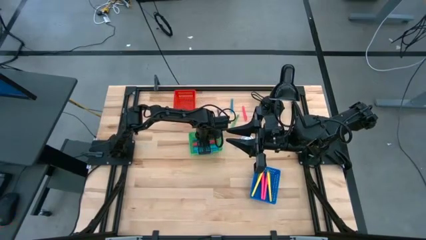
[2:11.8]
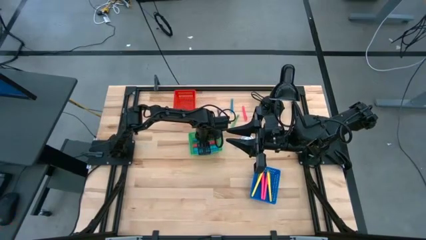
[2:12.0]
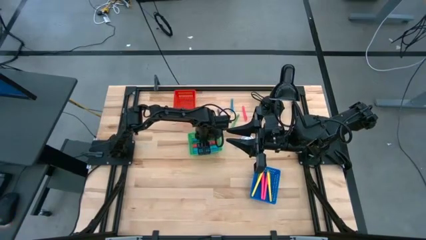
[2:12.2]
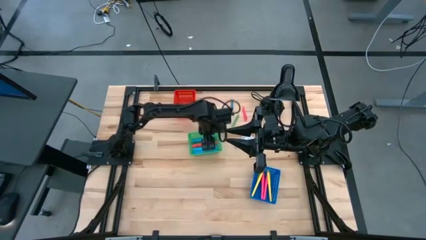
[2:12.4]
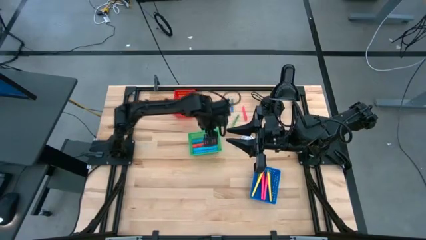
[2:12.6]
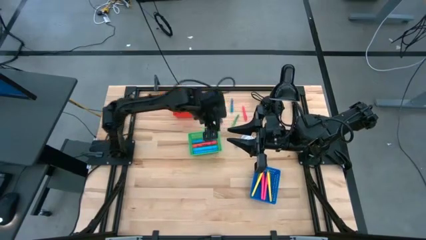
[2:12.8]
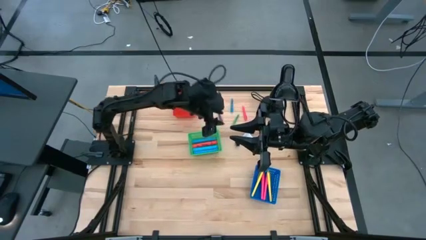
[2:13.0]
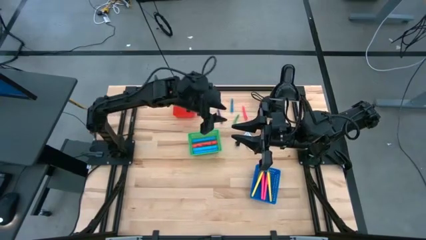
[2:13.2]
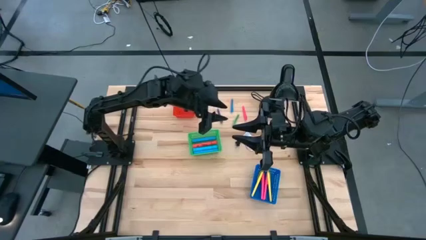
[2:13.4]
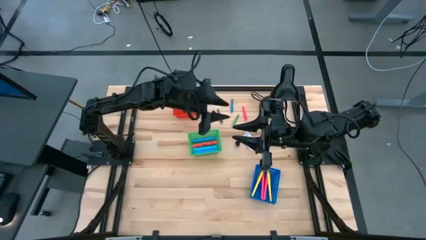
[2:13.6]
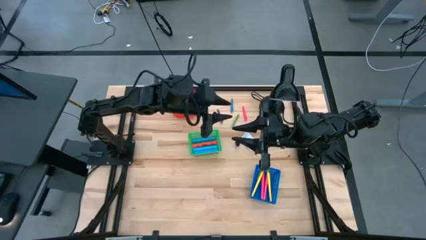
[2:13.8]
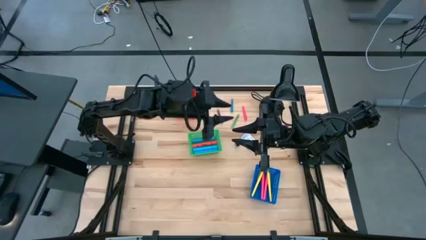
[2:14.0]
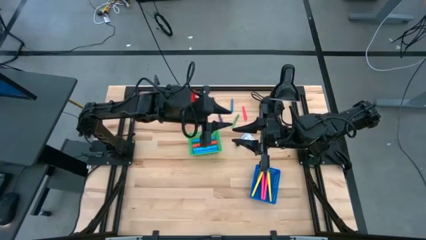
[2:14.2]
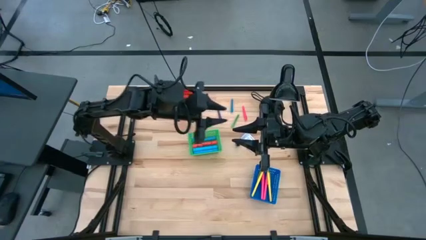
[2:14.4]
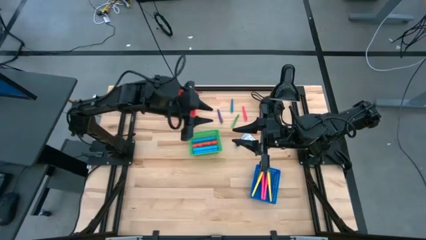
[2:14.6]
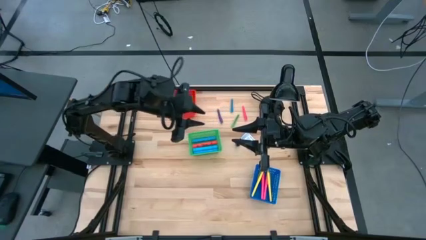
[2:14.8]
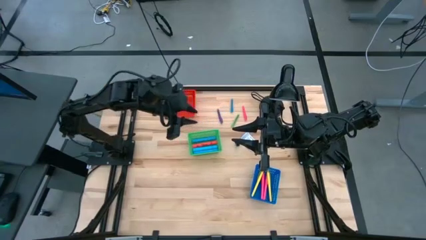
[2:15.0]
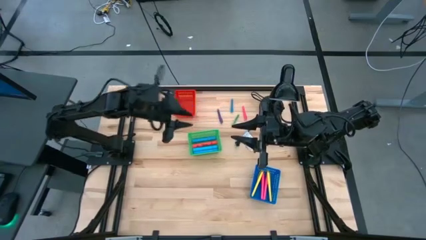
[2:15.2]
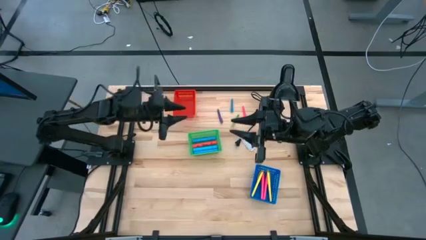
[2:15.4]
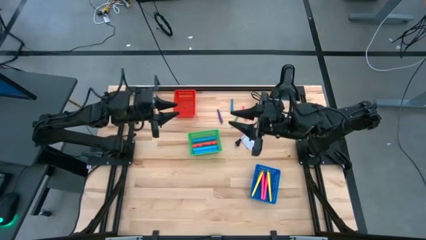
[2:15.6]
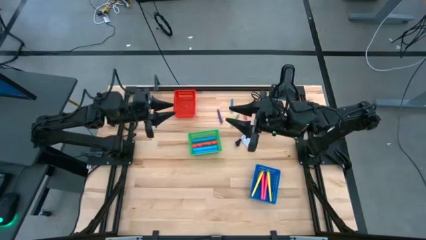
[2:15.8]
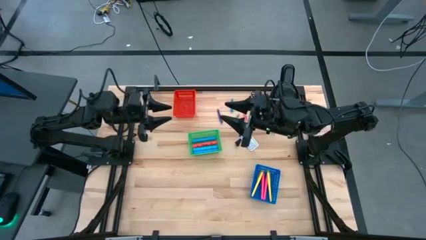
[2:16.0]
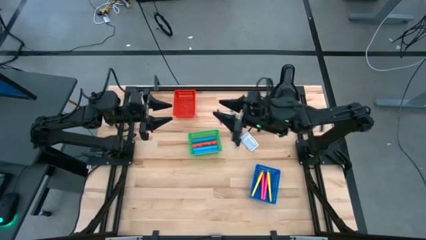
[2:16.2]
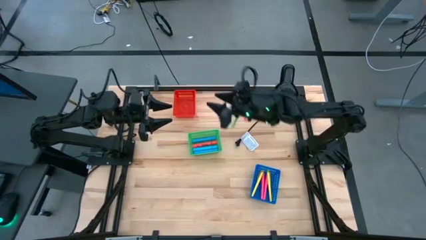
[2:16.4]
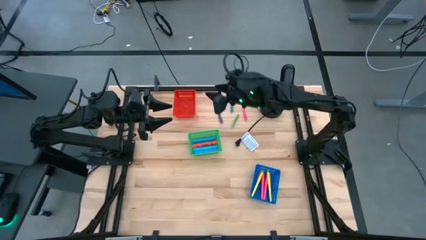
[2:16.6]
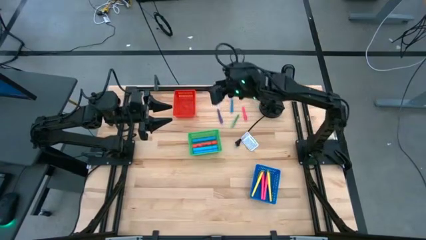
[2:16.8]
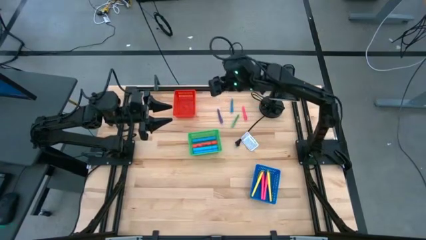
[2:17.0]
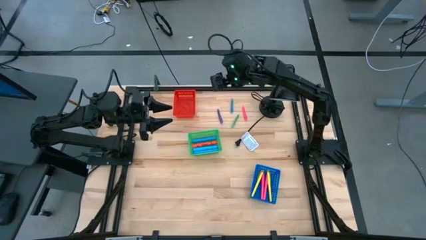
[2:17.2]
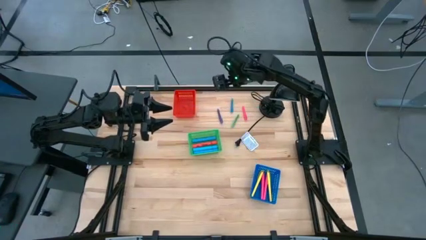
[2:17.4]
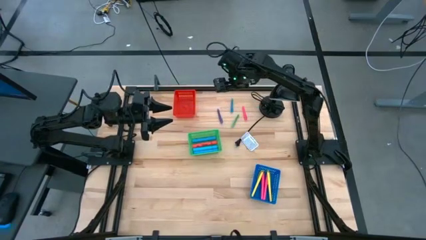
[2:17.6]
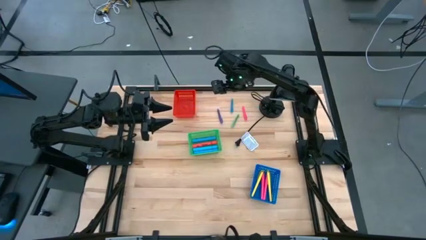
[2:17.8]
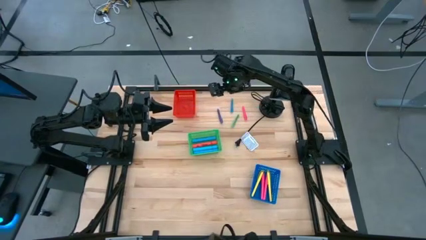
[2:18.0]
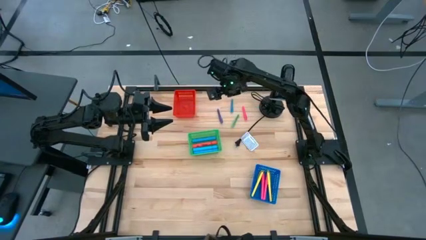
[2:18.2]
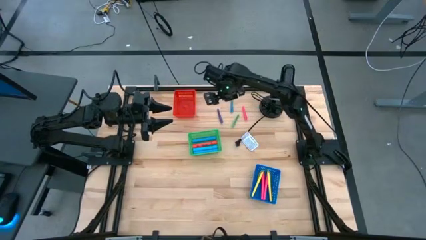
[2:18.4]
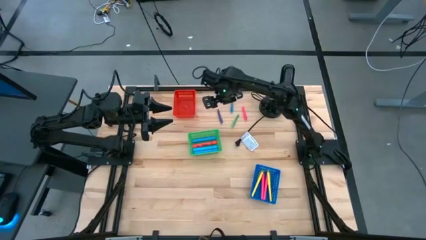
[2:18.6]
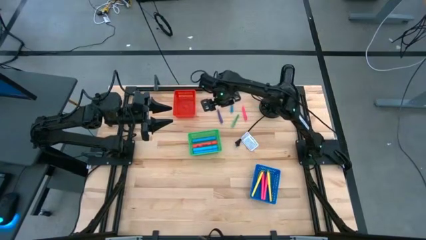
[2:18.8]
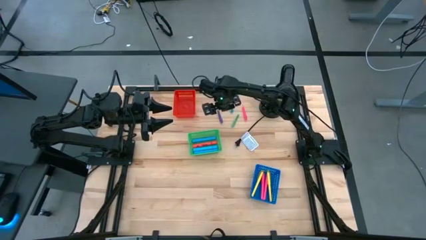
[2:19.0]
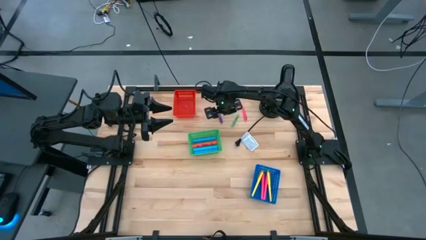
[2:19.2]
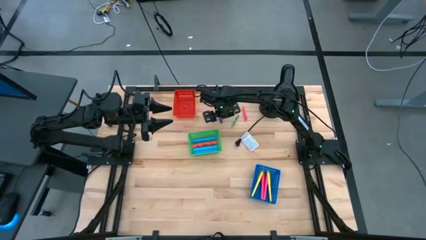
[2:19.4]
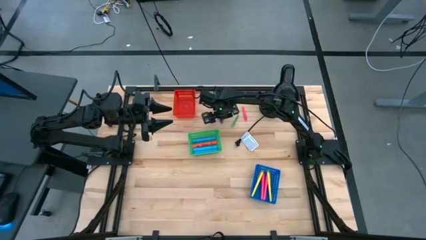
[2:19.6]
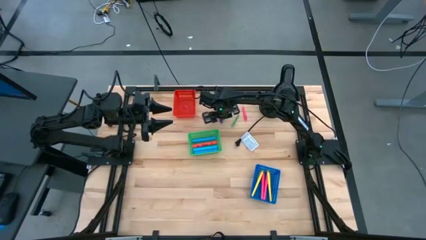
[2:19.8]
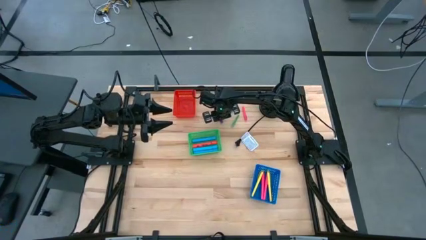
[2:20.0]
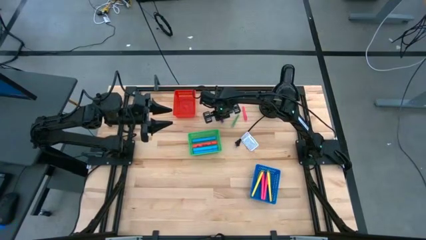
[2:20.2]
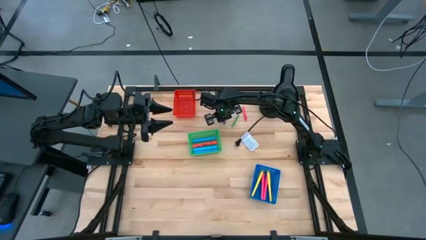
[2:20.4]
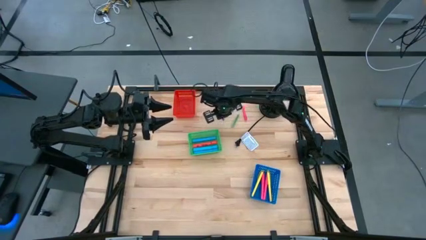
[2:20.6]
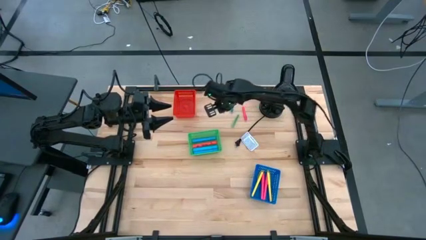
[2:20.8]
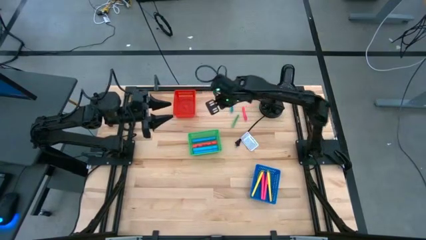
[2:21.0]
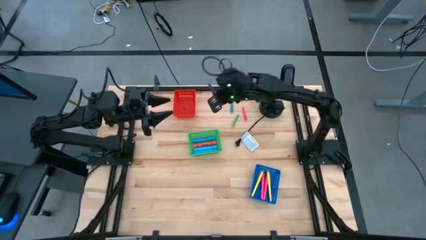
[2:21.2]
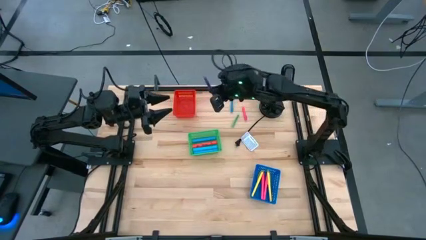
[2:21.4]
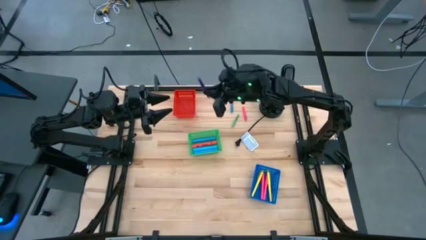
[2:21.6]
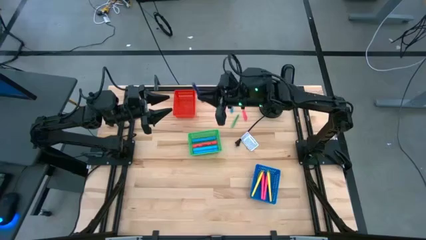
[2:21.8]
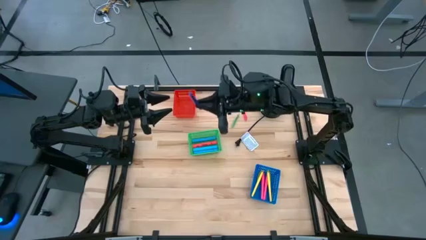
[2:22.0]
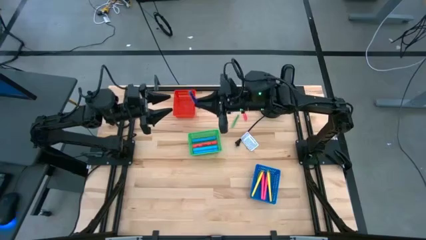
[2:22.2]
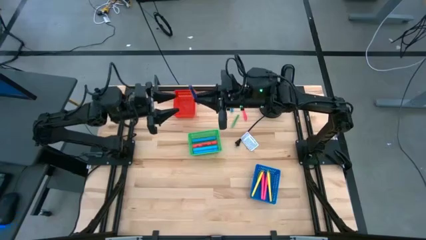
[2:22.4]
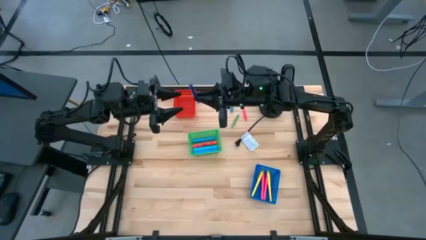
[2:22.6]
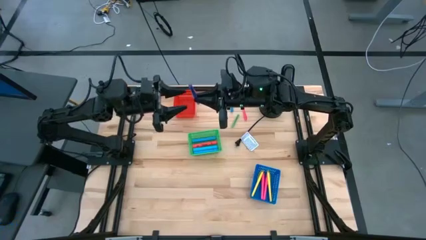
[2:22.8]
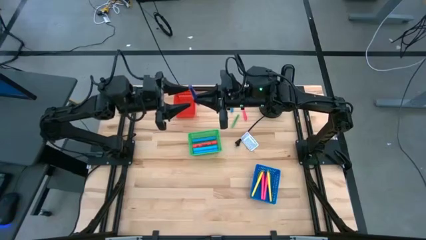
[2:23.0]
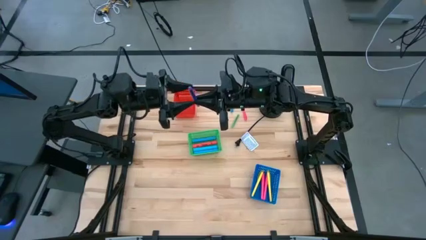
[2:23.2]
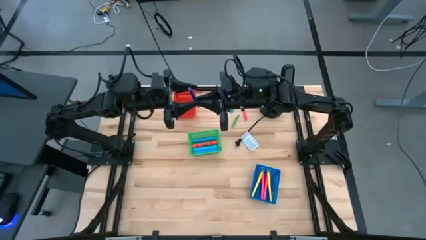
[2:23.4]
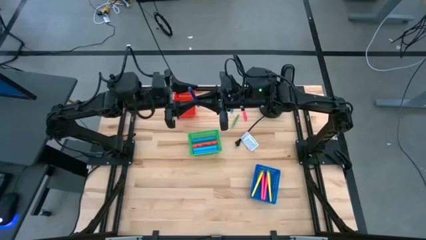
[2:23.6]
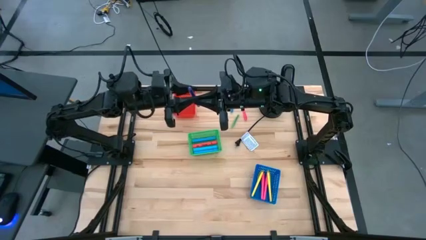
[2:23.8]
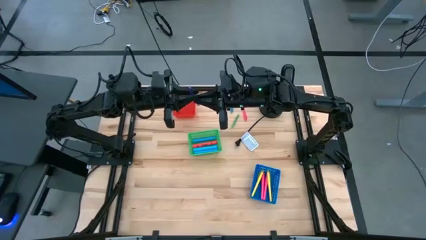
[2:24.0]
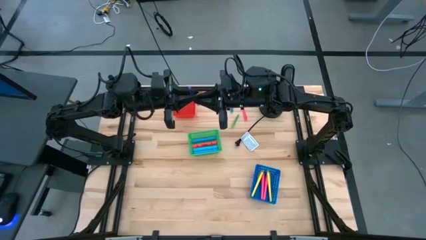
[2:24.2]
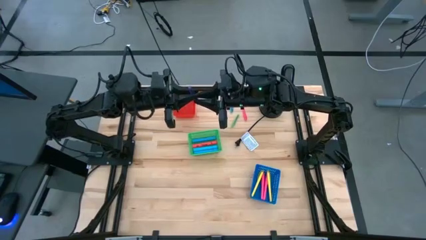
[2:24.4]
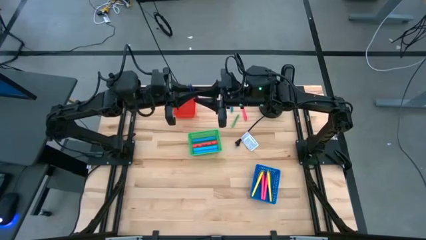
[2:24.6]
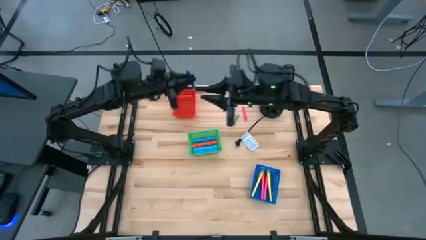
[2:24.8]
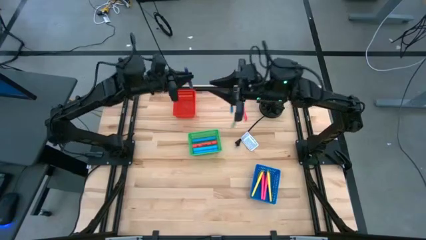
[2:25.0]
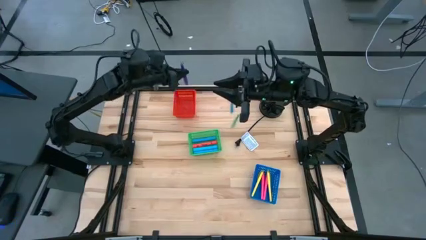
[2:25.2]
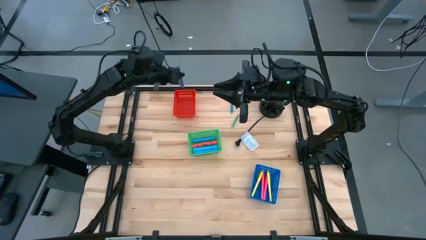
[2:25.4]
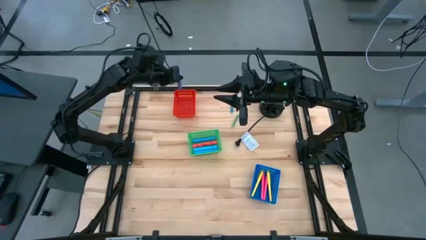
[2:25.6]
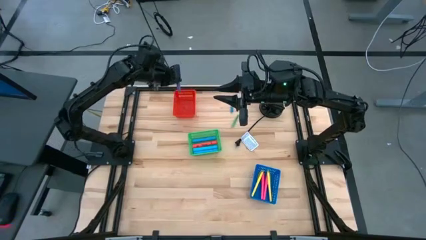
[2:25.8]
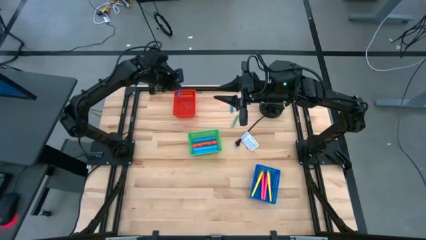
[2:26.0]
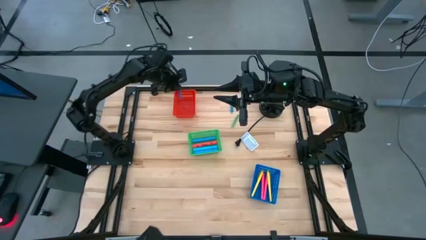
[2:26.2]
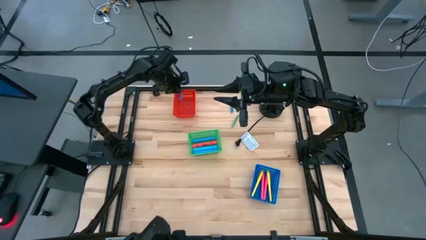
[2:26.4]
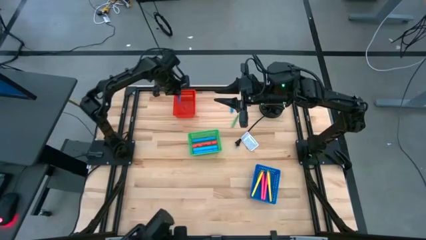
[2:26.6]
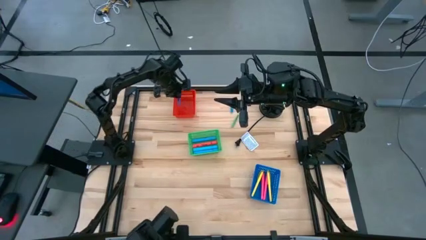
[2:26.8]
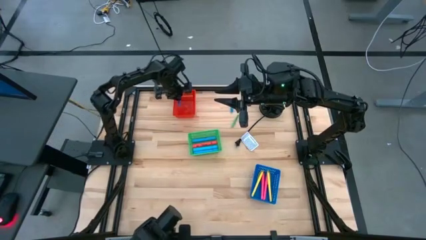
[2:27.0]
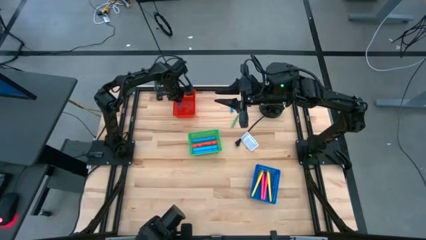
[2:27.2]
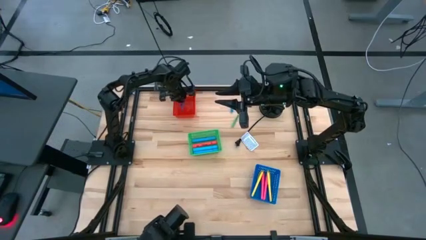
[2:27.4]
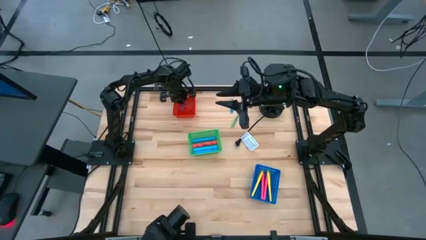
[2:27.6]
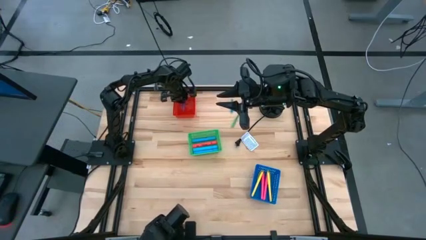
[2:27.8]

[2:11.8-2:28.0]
Task: Pick & Place Markers
Put the small purple pen into the red bin
